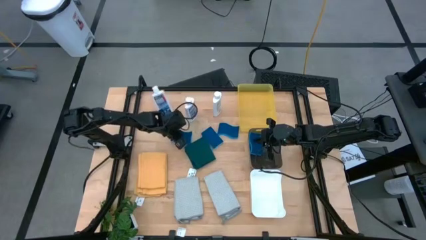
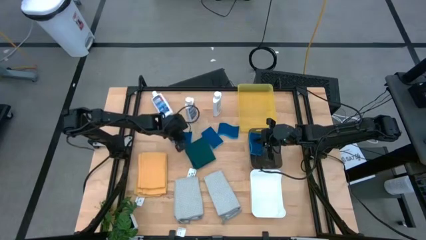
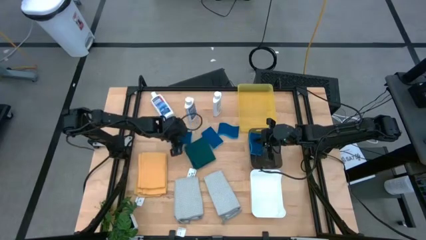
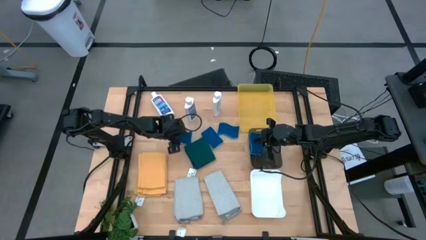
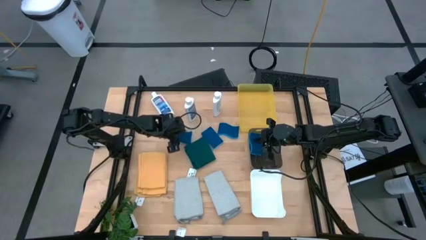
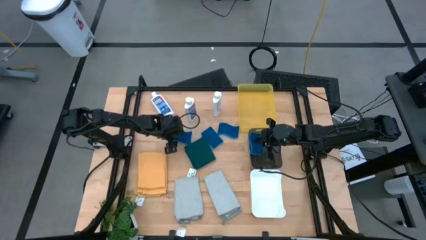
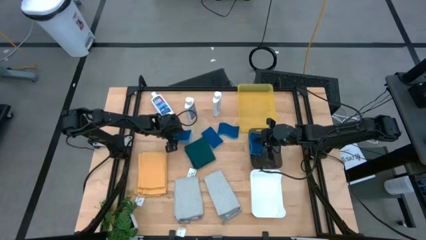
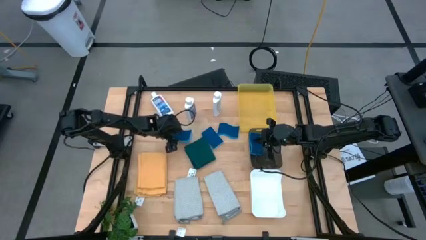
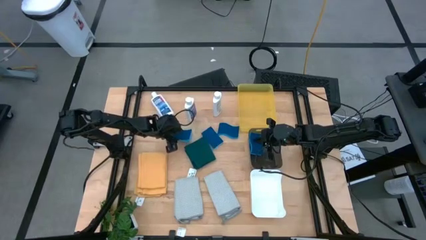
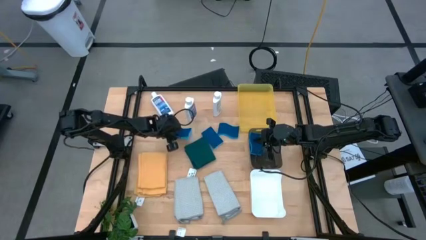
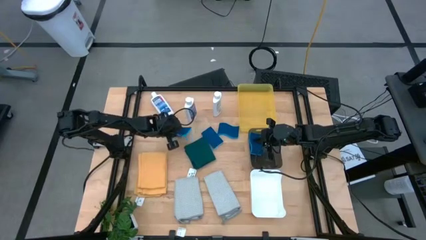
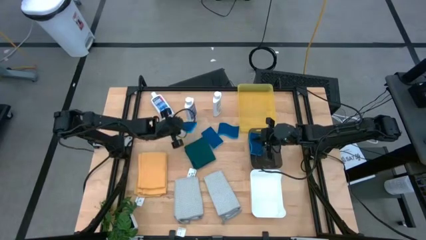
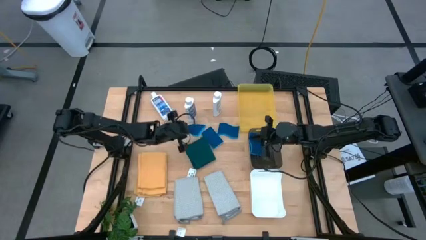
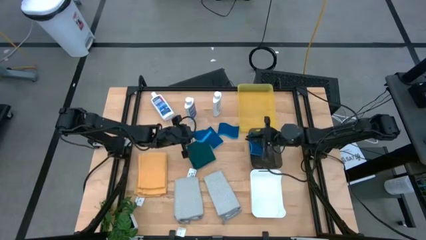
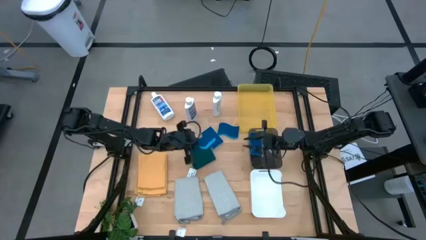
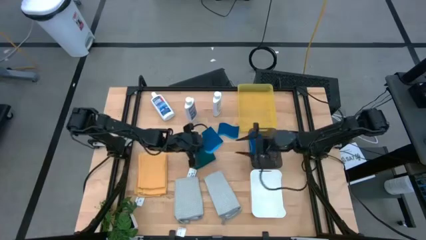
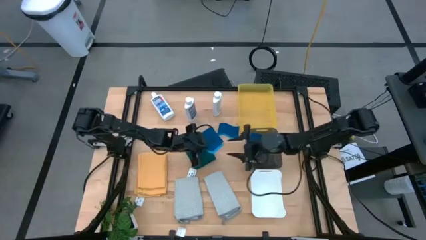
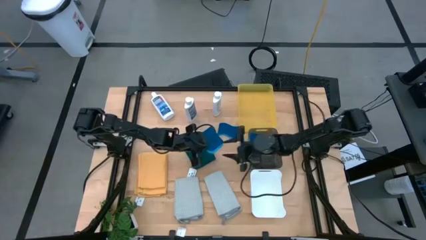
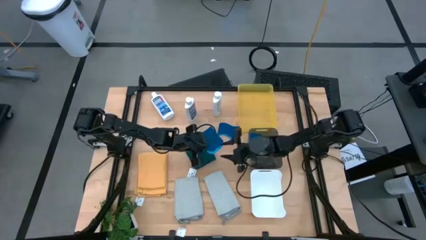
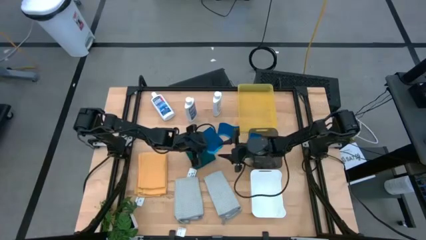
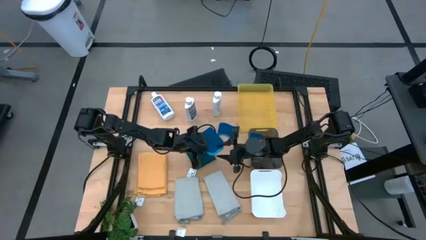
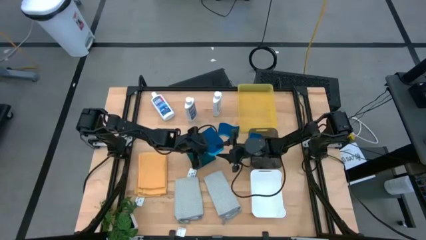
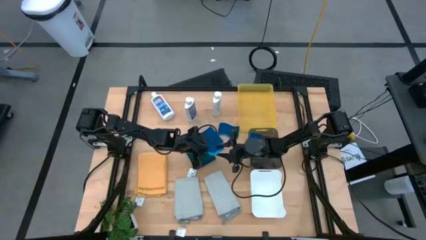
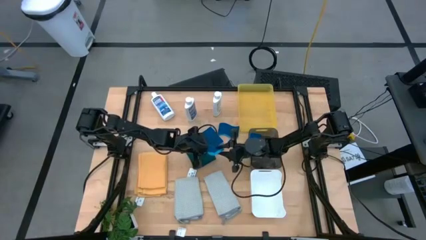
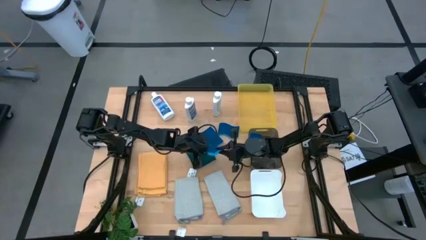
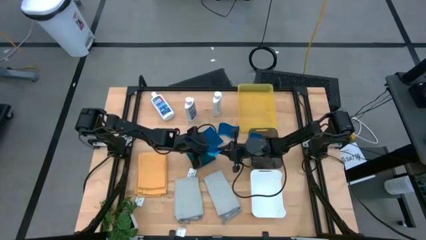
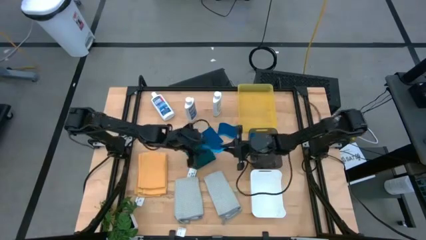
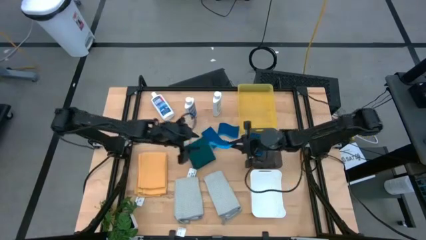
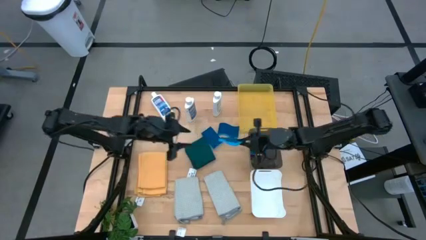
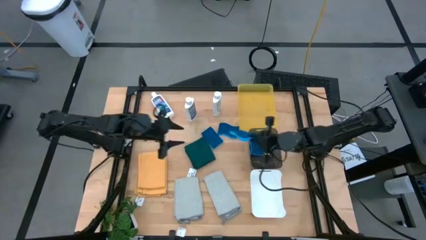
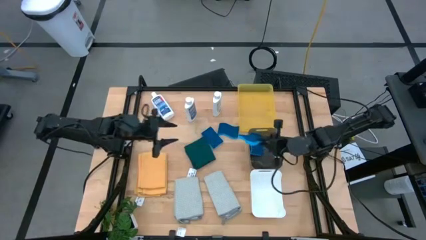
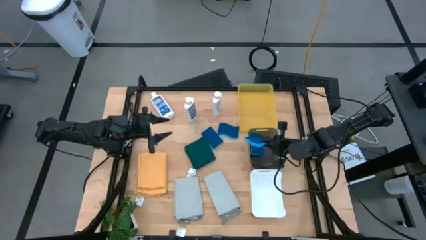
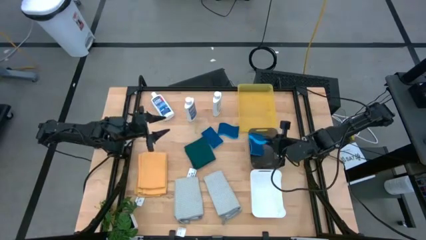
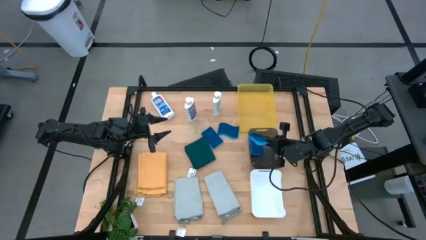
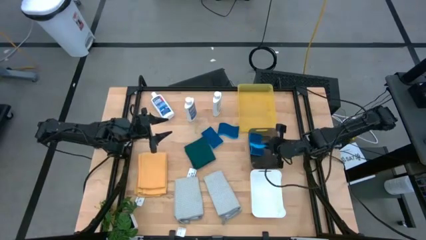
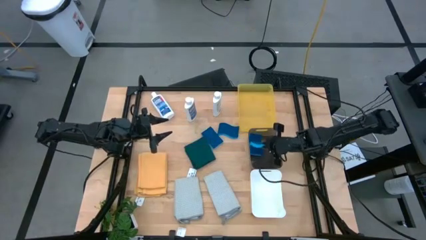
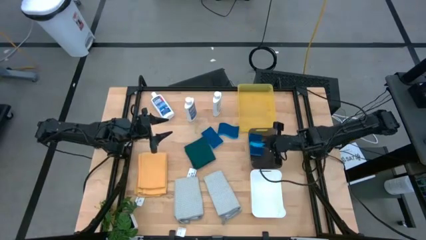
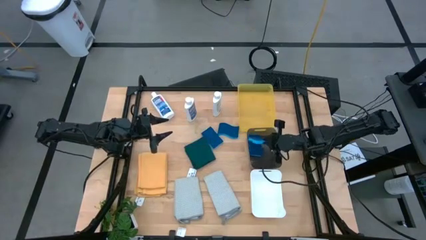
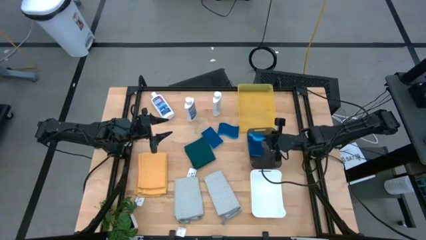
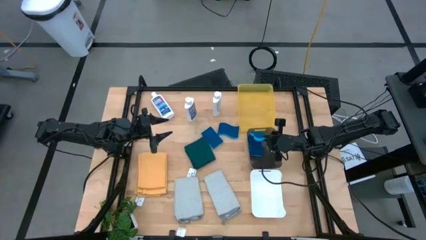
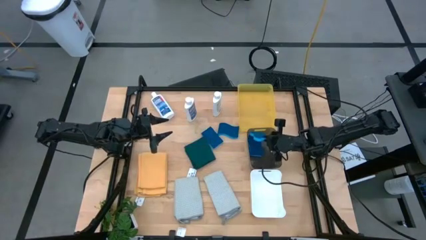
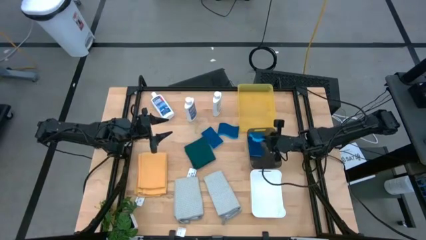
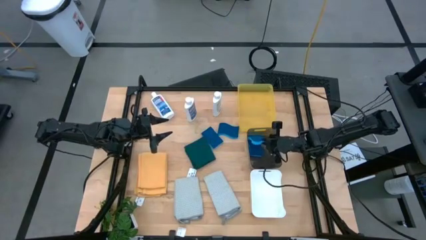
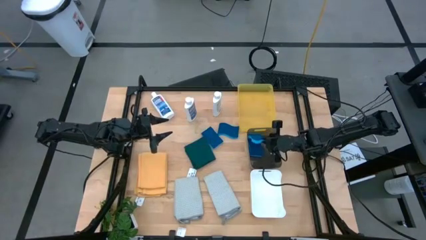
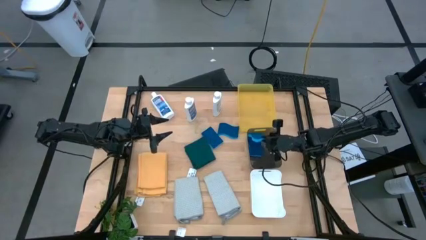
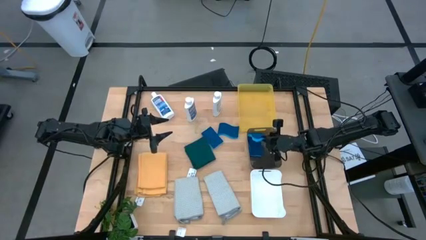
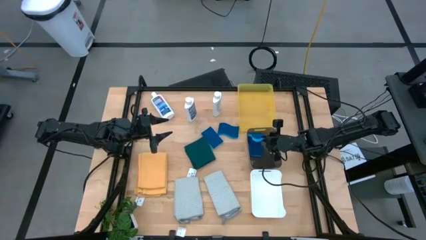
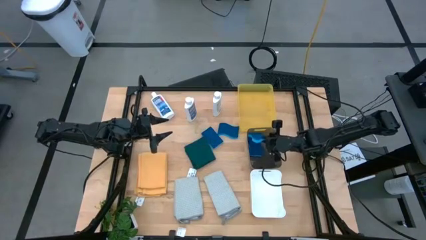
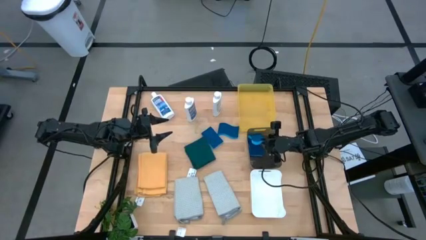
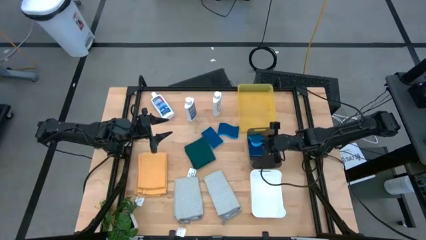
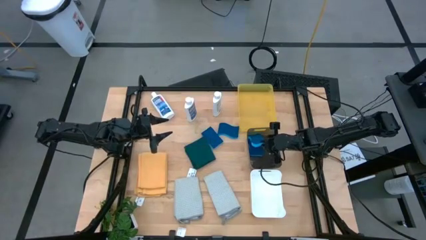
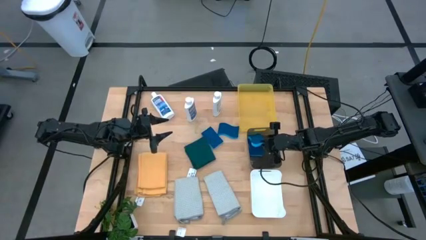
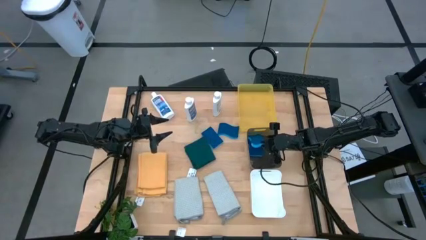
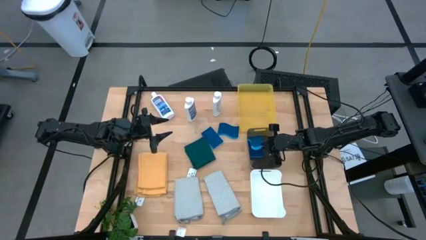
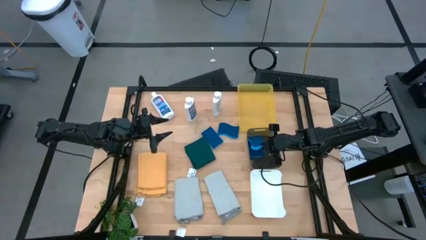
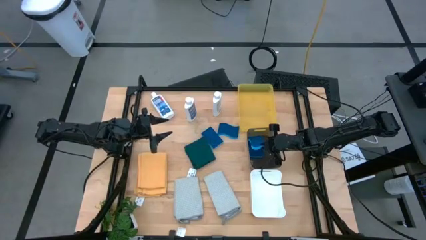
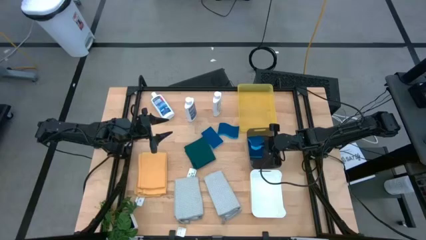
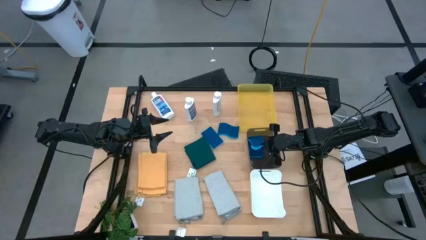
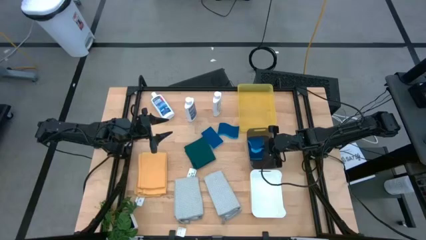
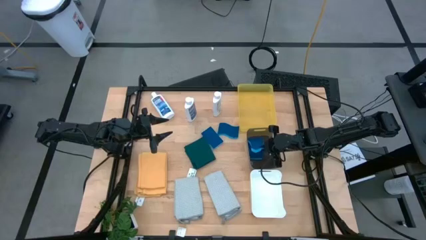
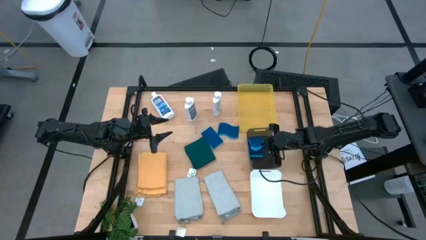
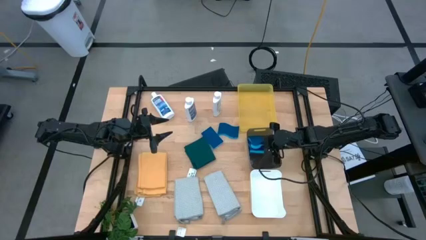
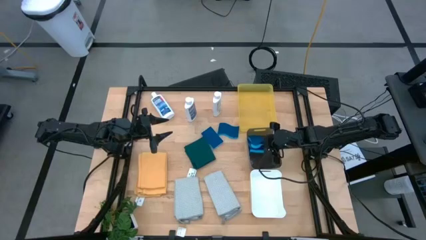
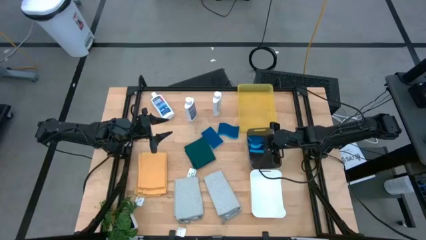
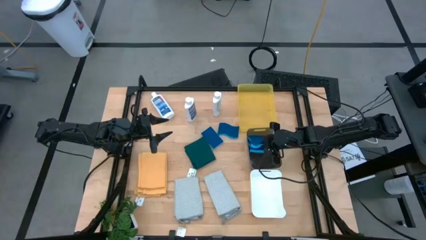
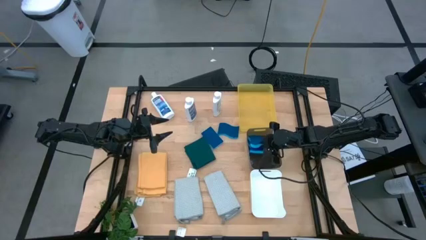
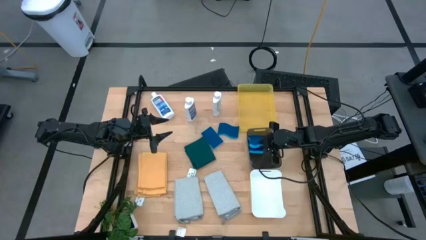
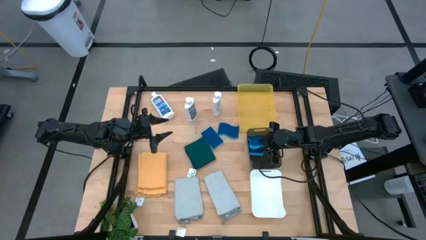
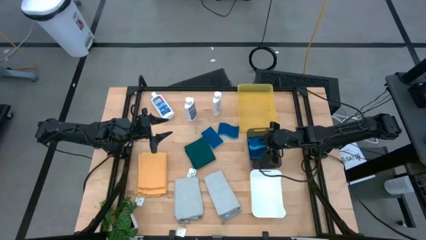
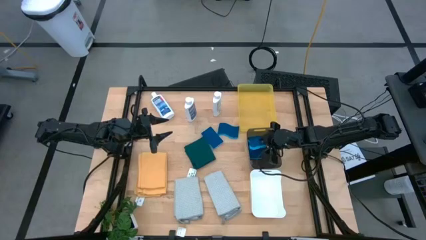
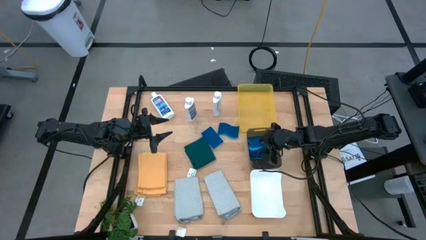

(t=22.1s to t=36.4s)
Task: Pick & Place Kitchen Items
Put the blue sponge into the black bin
